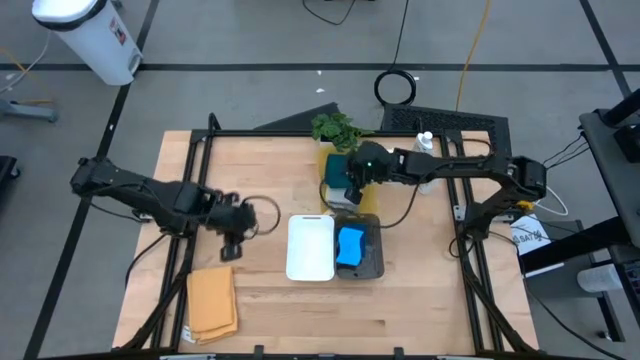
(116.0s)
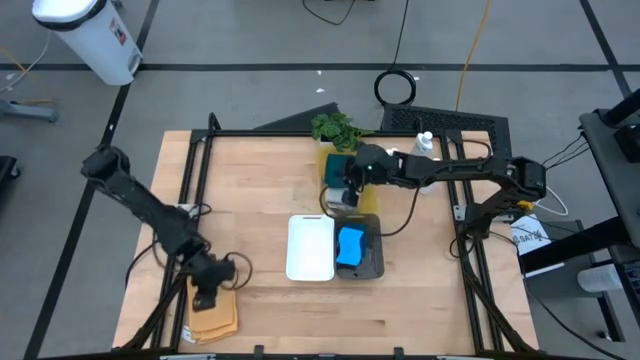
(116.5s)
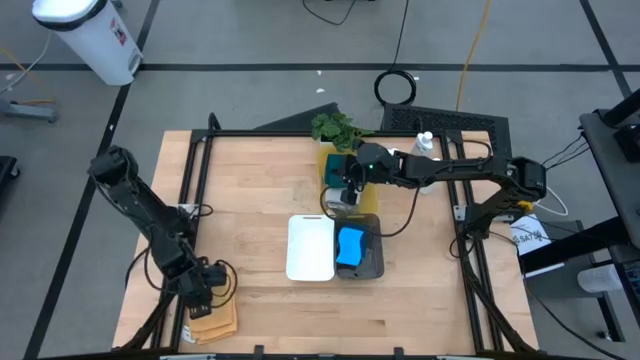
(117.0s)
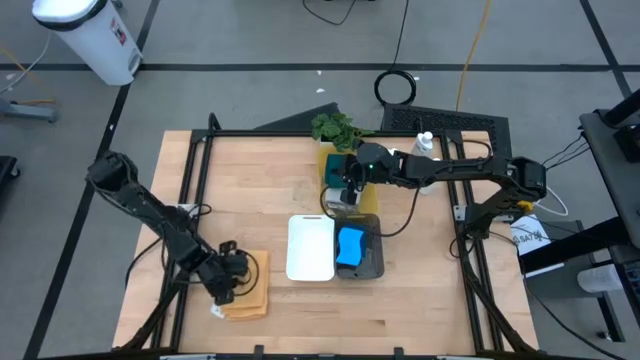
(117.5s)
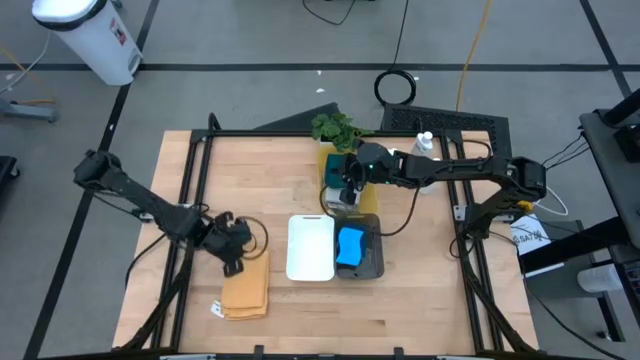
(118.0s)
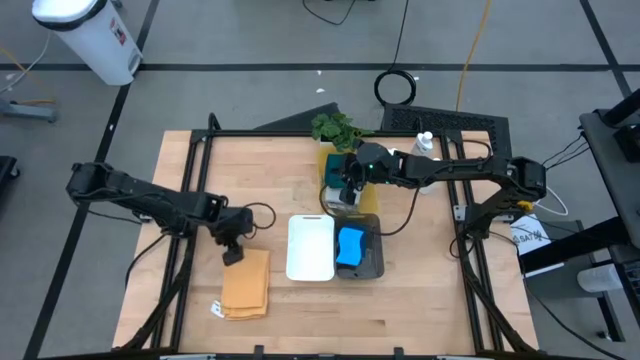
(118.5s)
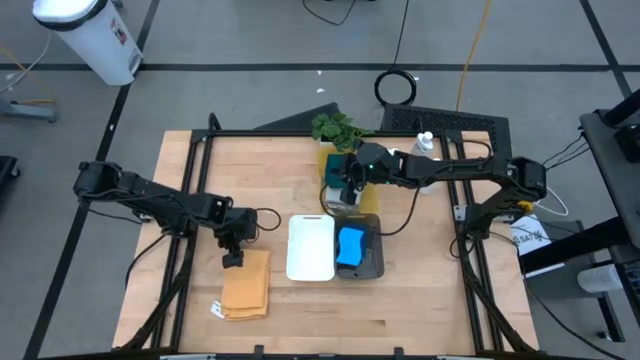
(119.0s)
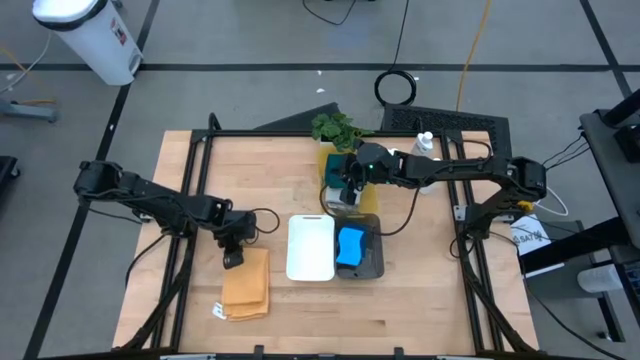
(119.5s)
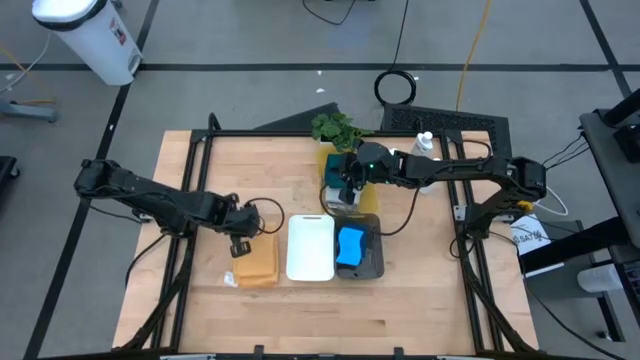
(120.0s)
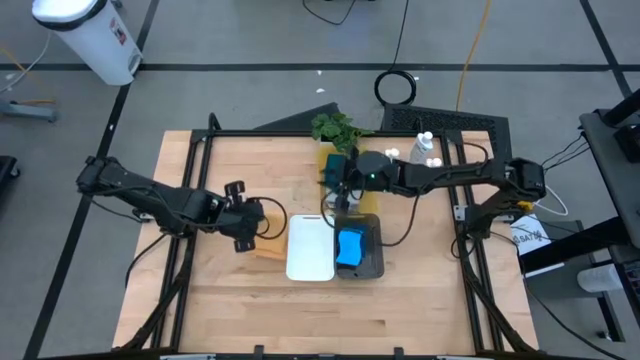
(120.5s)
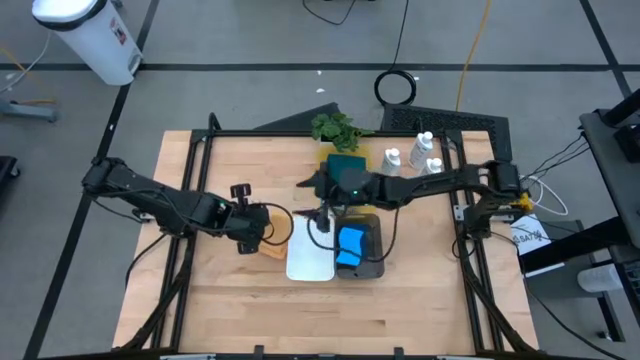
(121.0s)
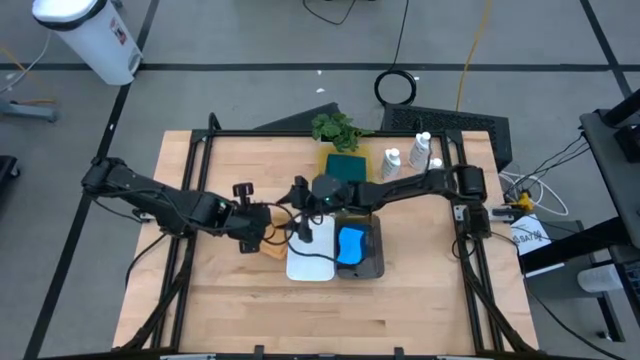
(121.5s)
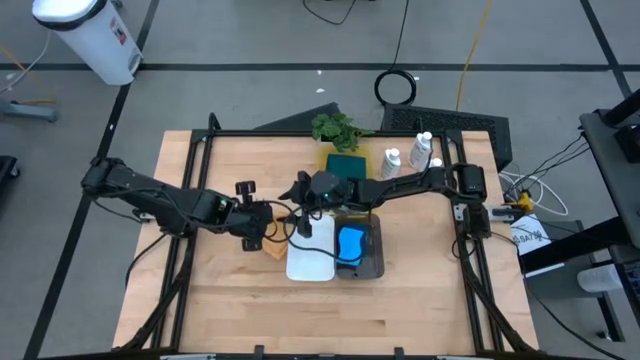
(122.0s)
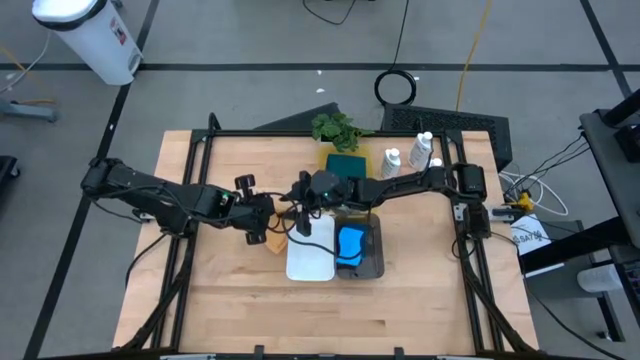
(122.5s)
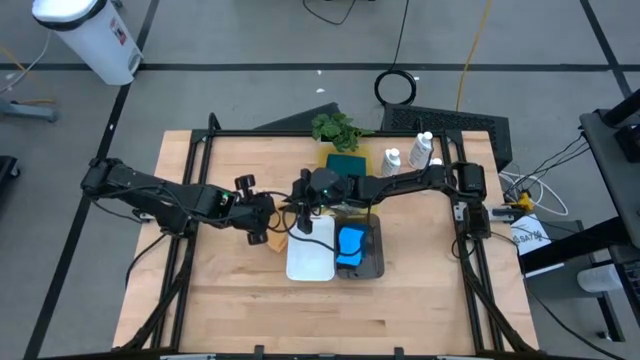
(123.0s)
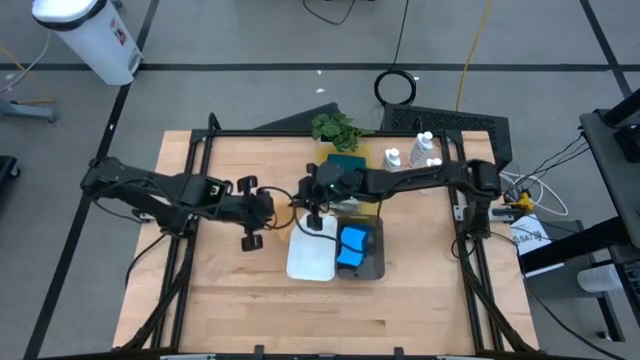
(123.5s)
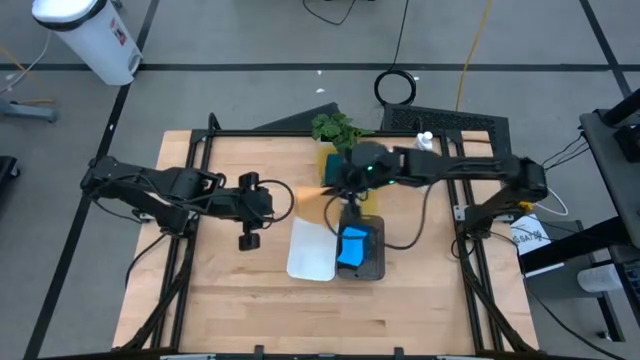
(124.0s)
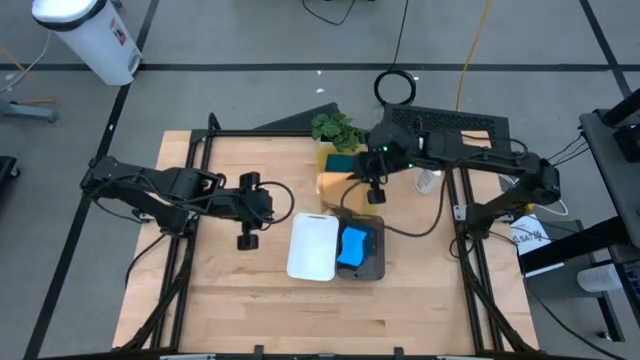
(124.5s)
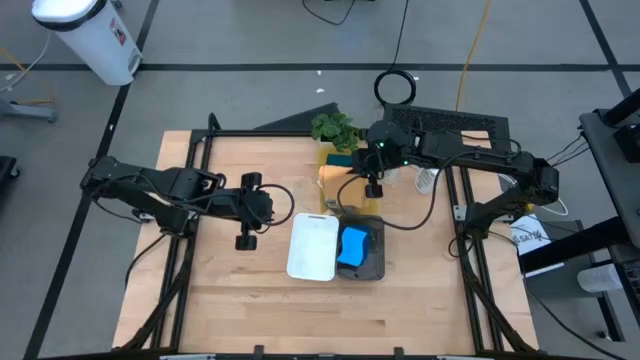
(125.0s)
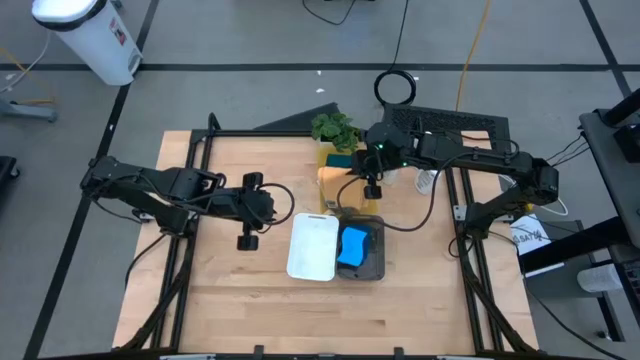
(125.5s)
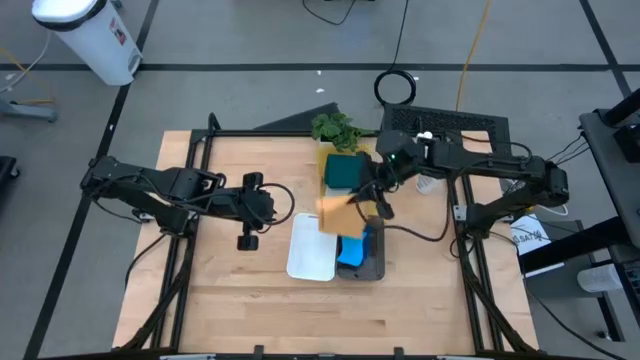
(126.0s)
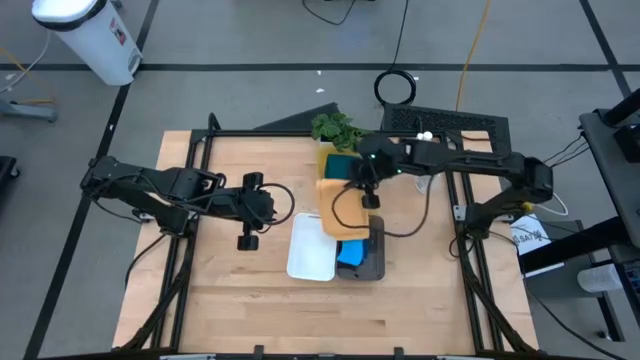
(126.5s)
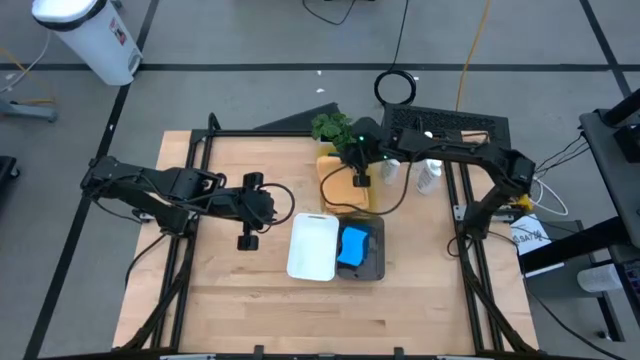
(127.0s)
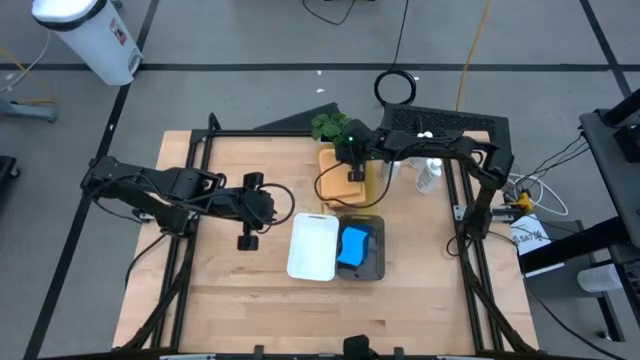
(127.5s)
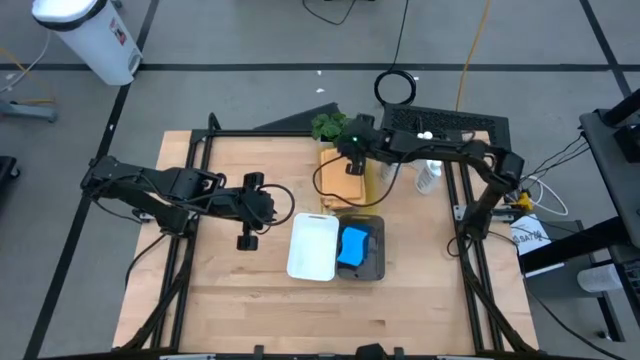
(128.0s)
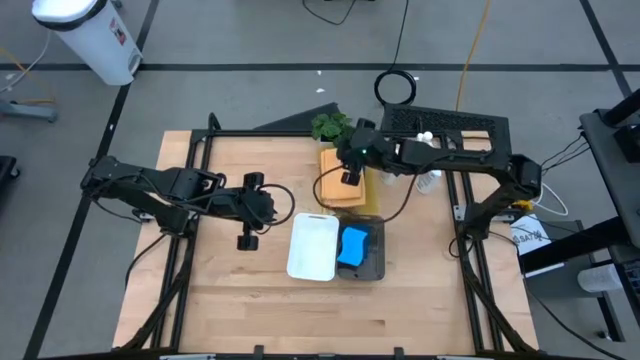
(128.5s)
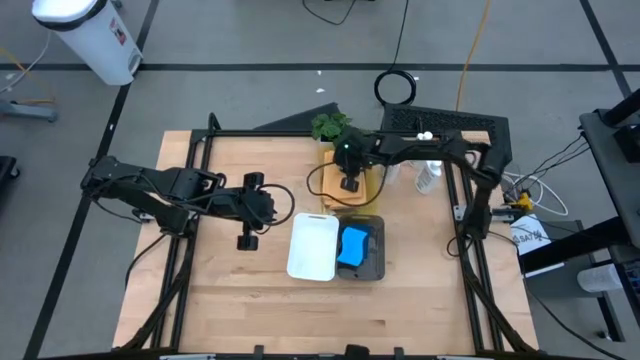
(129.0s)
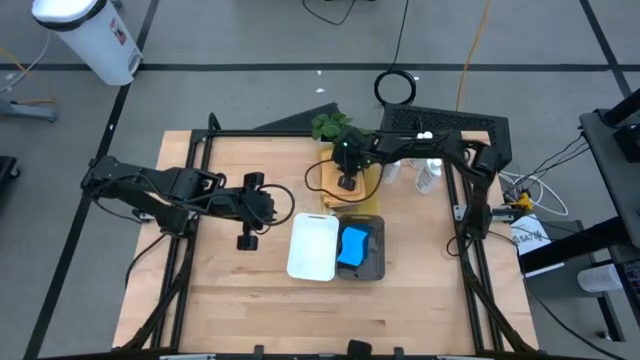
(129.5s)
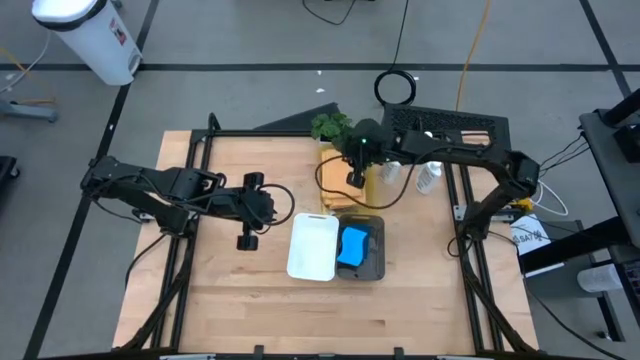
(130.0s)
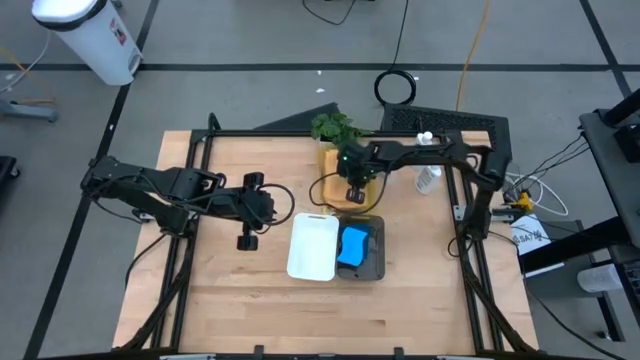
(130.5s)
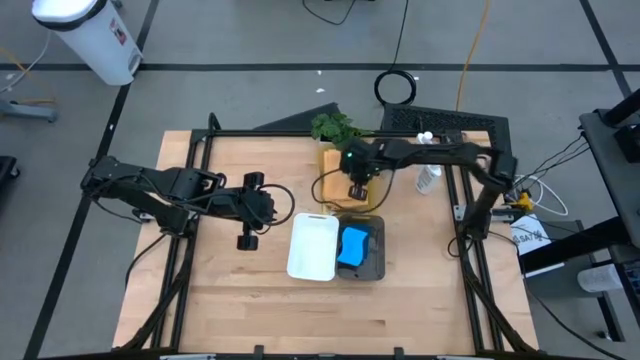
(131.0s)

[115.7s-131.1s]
Task: Pick & Place Kitchen Items
Put the light orange microfiber into the yellow bin

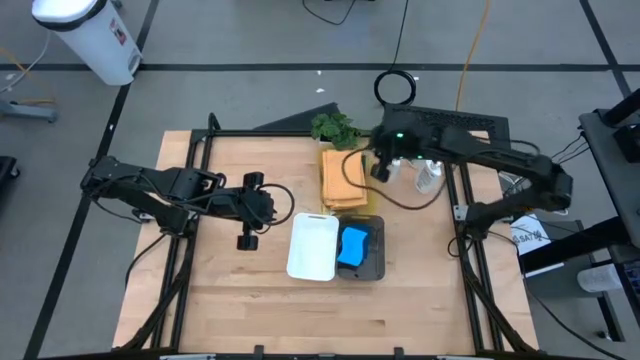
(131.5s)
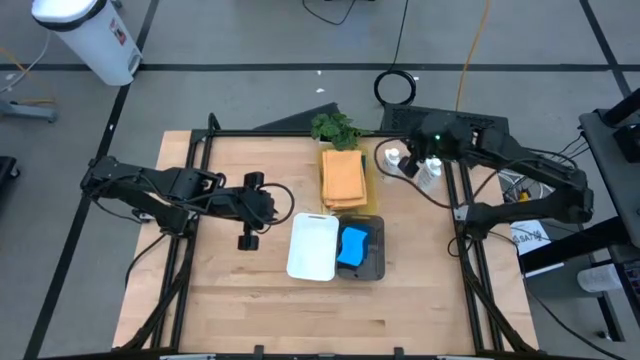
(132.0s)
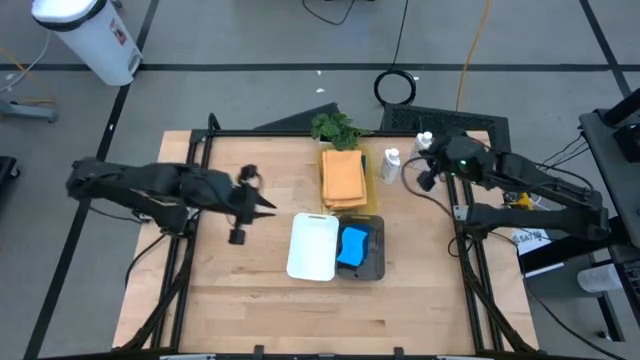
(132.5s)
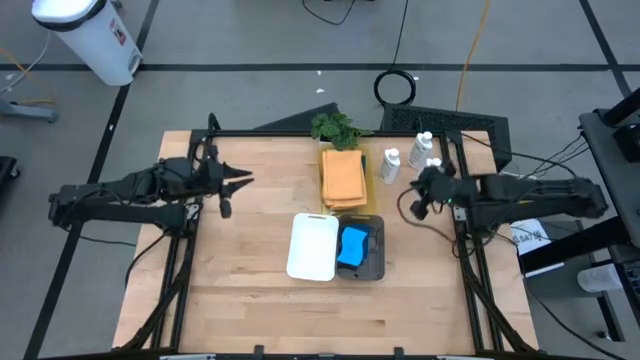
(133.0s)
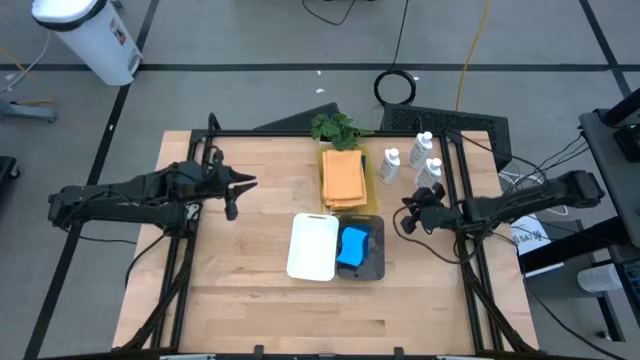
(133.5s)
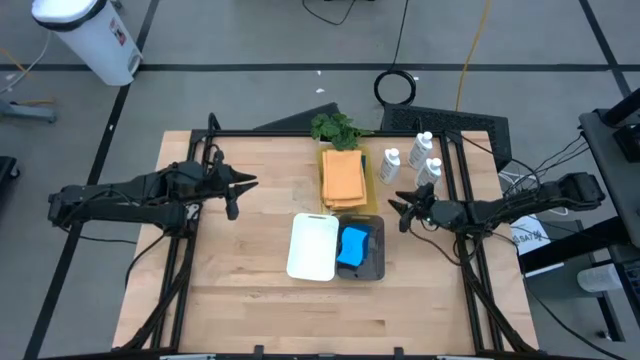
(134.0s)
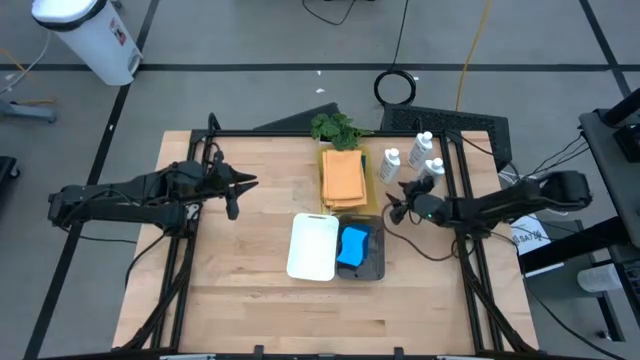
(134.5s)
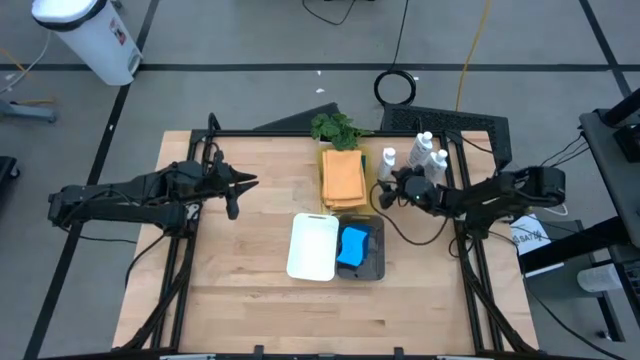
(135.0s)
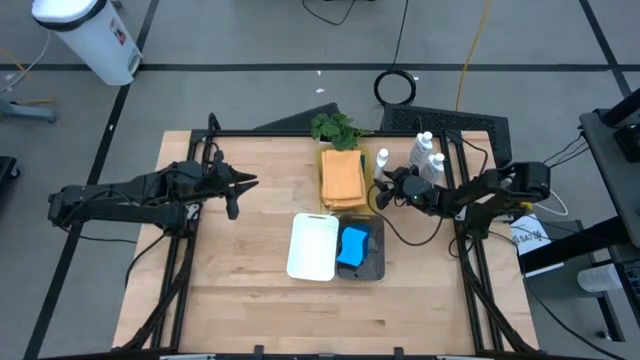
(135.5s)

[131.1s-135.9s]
Put the left plastic restorer bottle into the white bin

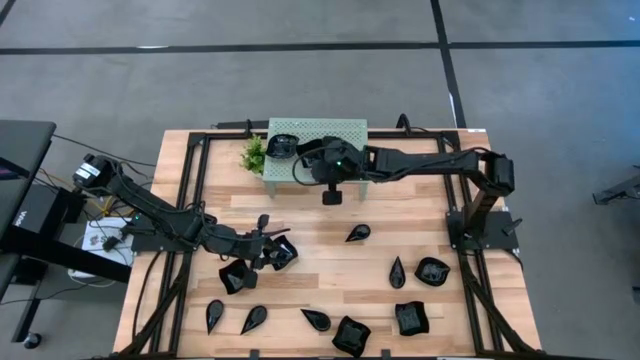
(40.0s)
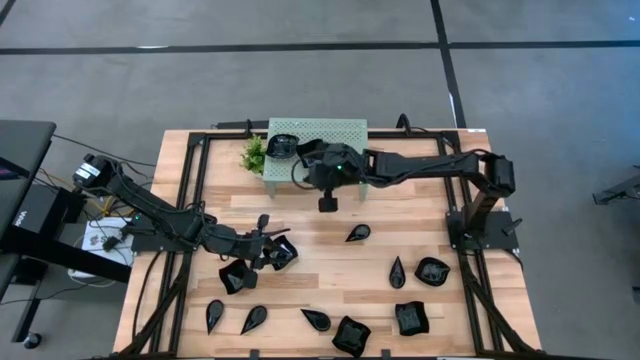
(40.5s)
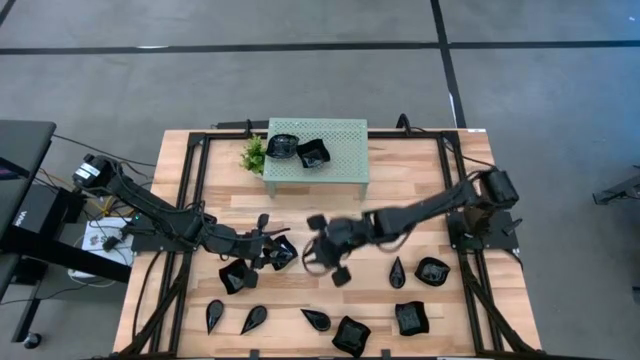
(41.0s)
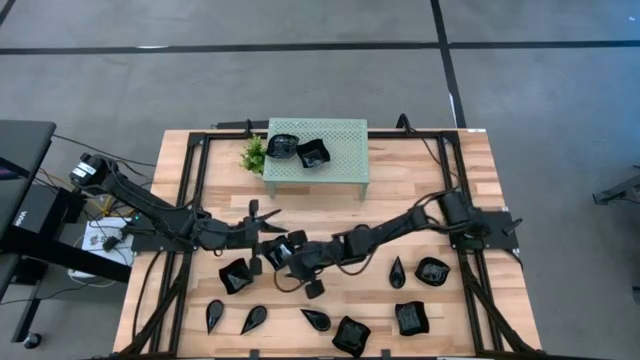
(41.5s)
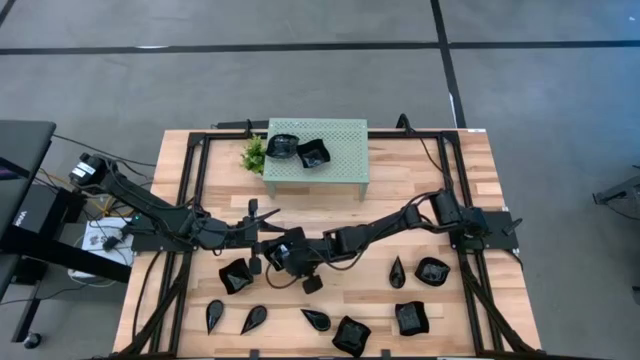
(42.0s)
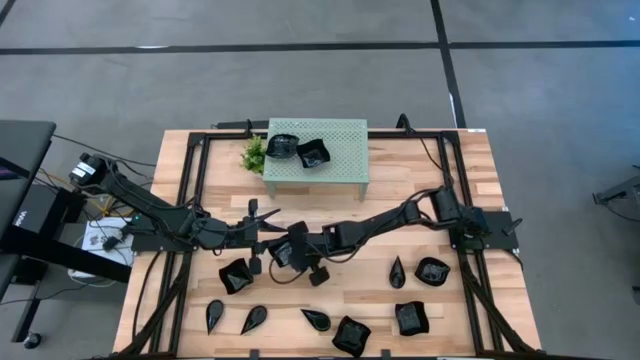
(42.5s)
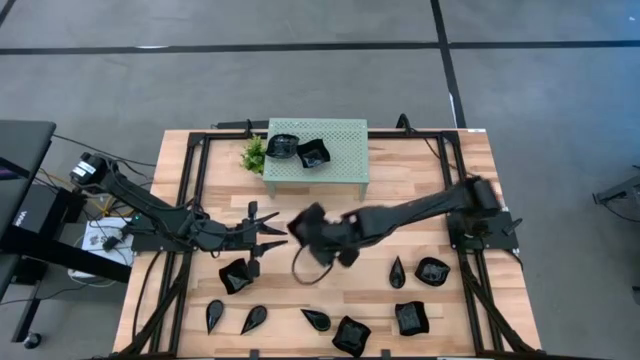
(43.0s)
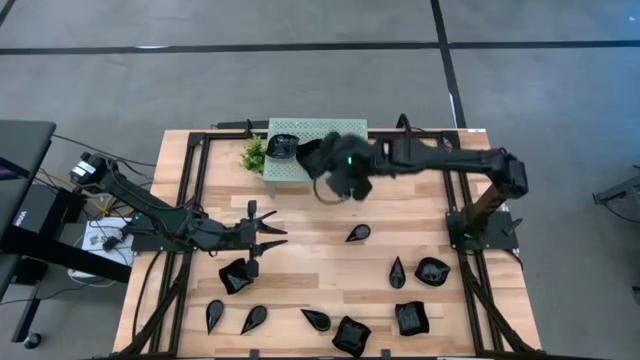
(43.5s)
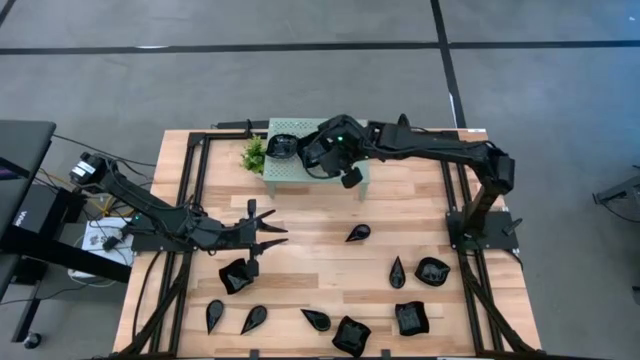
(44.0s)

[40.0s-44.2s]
Task: Pick & Place Mini shaped plates
Stack the distorted square plate on top of the other distorted square plate on the shelf
